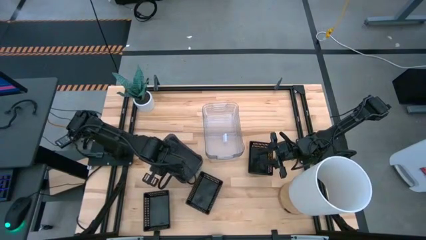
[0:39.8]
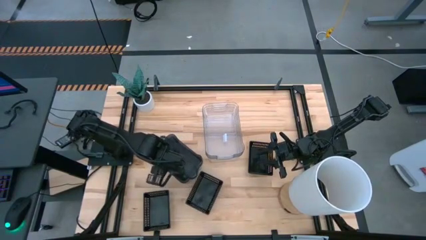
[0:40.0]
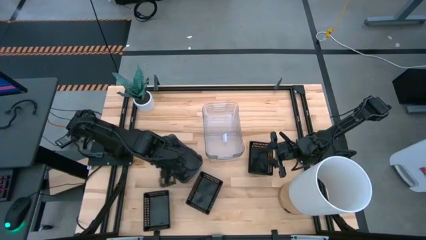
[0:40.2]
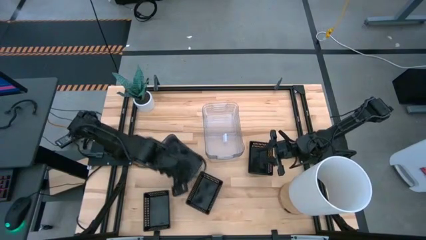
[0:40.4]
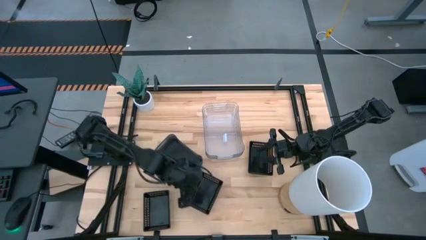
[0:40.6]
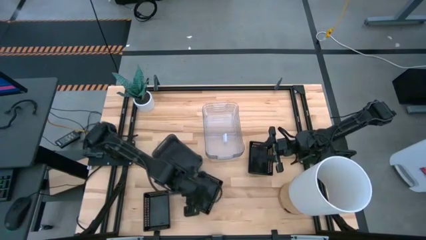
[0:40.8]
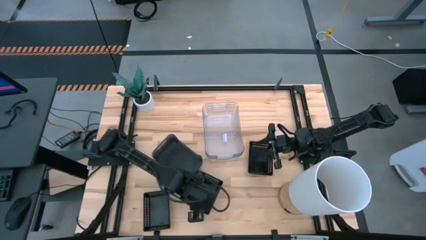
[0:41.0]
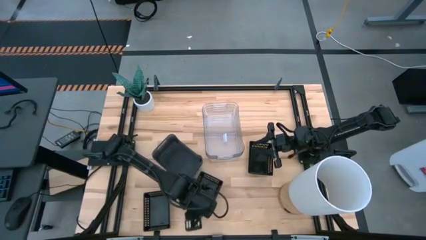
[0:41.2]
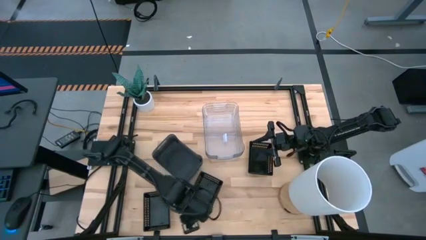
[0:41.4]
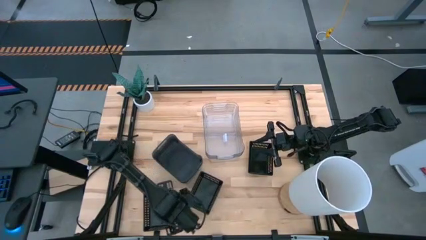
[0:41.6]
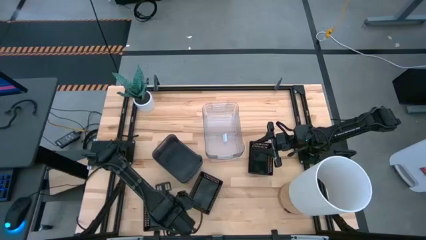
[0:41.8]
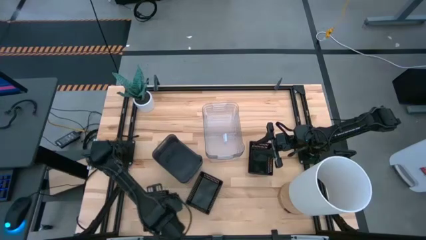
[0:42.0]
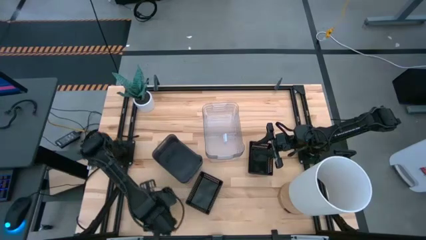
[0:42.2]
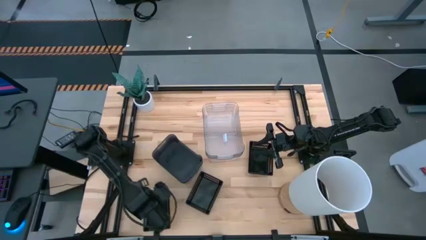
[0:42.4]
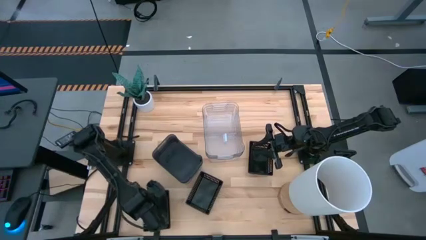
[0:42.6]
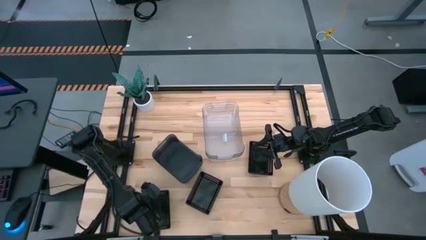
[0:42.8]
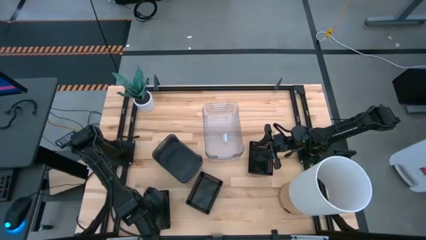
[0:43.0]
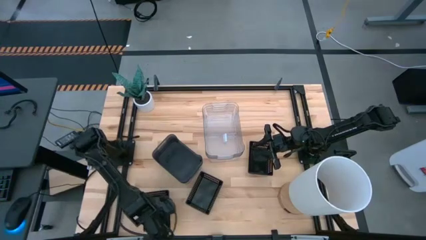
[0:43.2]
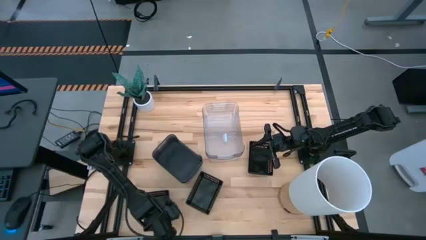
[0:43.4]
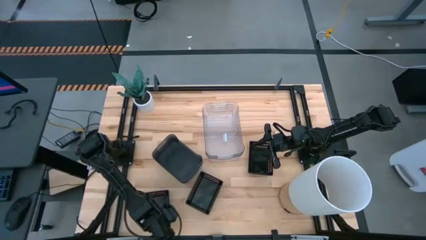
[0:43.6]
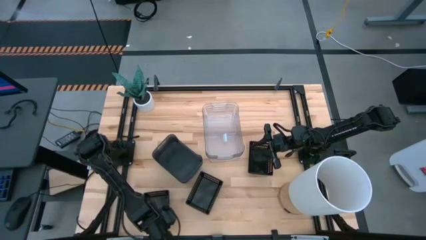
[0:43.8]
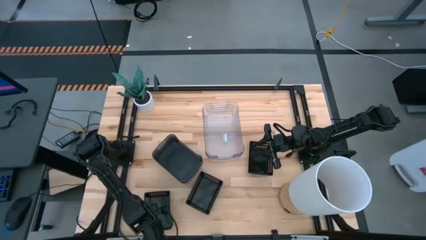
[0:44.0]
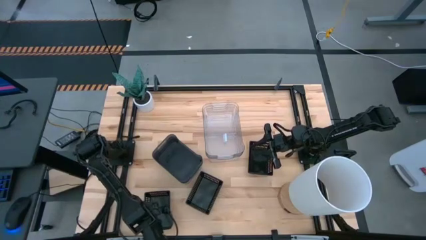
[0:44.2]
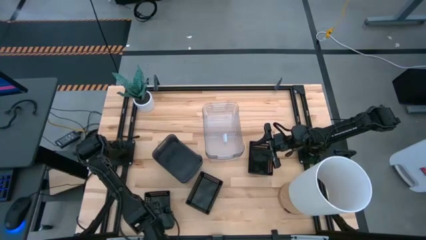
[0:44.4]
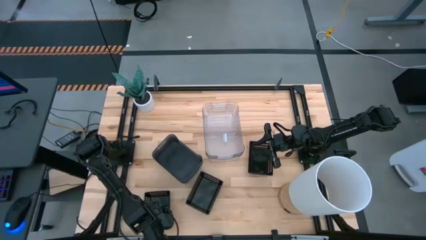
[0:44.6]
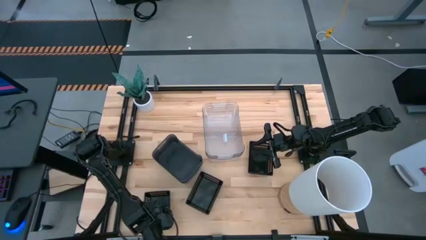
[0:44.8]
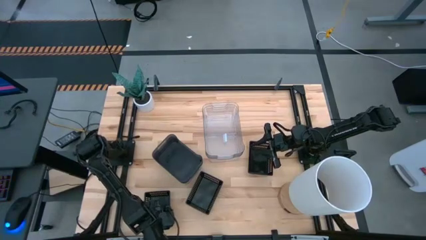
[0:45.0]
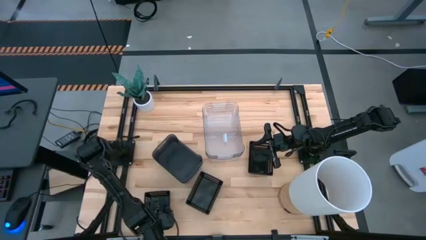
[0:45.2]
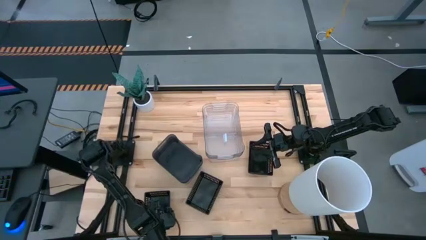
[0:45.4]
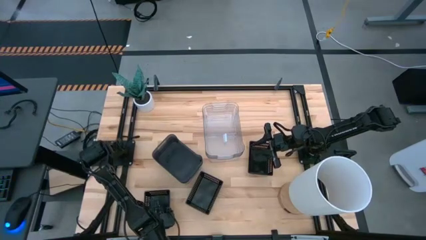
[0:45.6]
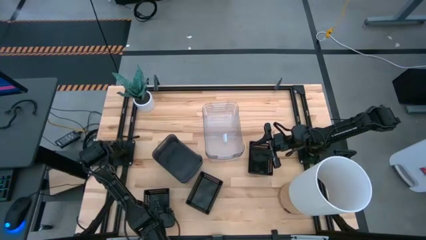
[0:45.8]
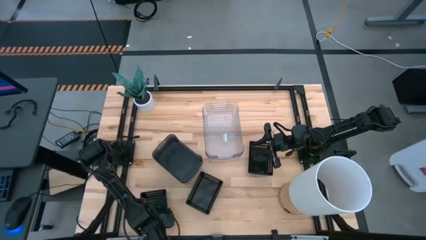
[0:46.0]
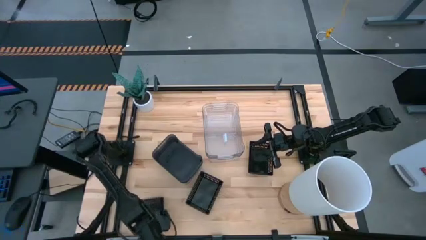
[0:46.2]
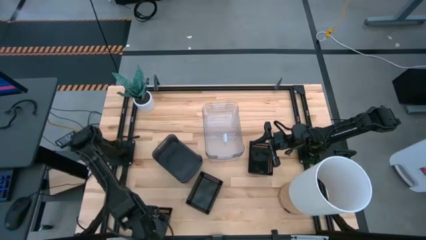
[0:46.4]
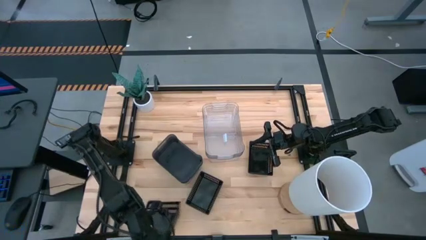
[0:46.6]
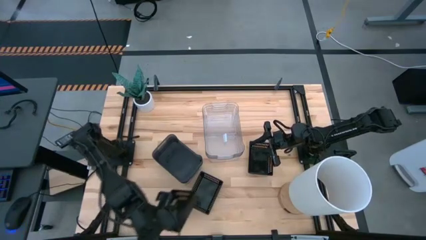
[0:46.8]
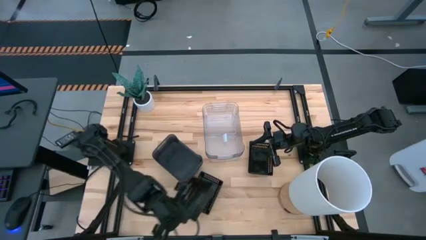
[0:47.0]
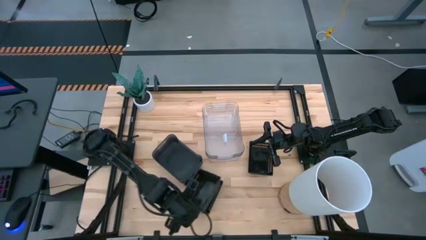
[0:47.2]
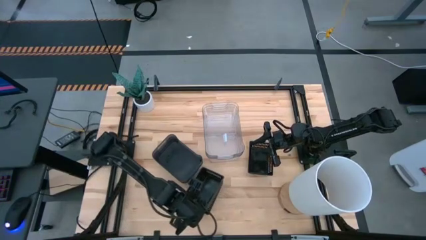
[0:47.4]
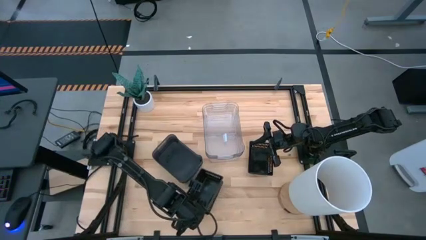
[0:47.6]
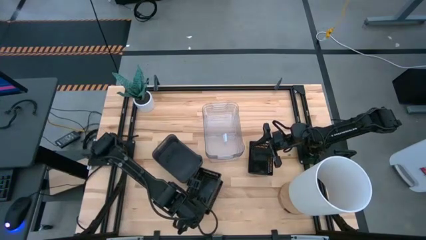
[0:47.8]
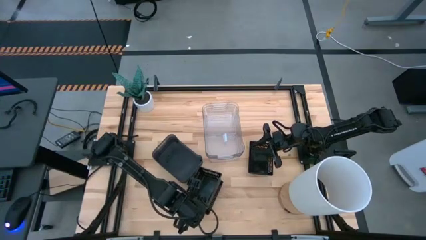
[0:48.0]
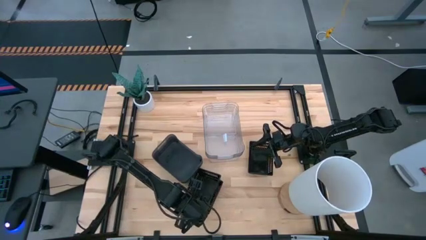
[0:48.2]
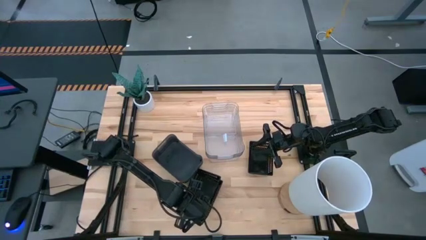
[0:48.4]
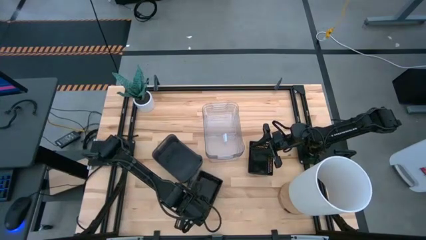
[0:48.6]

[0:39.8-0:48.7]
Stack the left black basket on the middle black basket

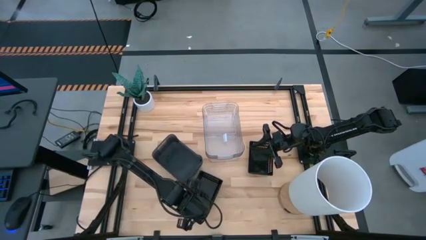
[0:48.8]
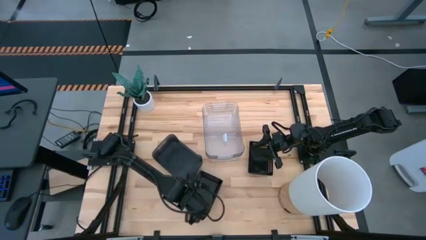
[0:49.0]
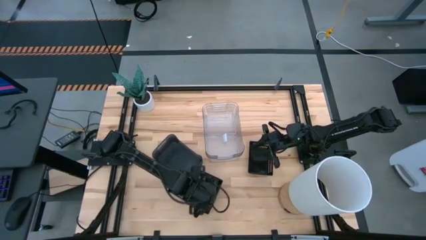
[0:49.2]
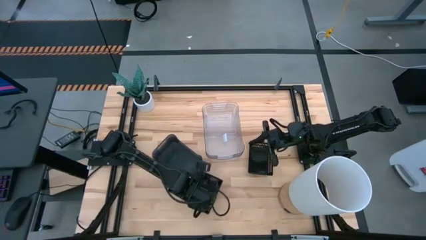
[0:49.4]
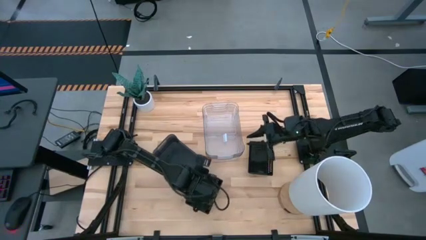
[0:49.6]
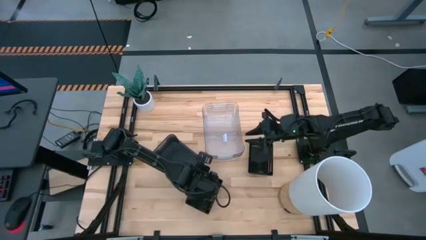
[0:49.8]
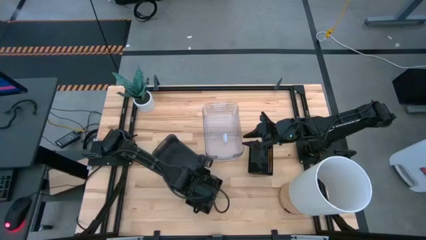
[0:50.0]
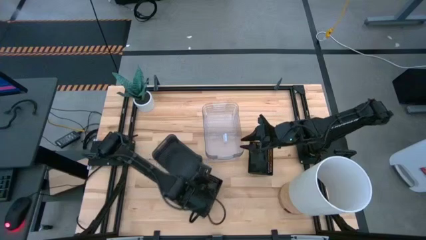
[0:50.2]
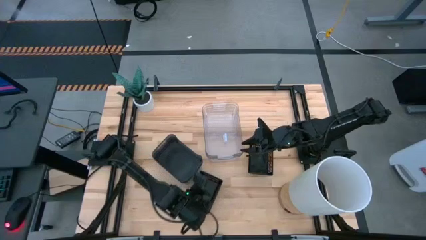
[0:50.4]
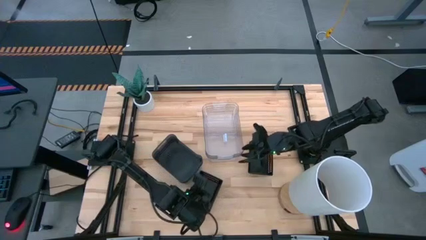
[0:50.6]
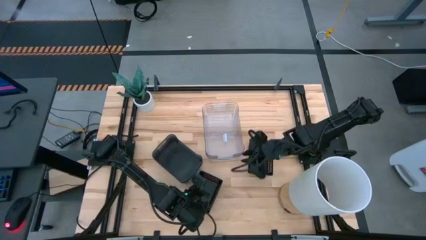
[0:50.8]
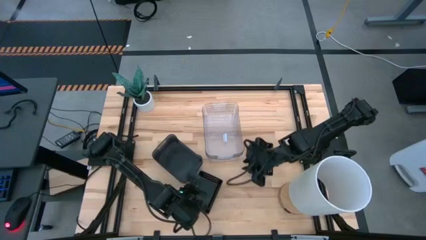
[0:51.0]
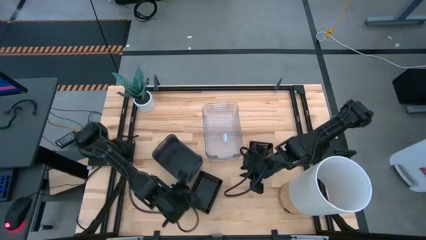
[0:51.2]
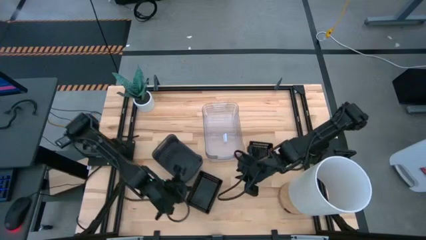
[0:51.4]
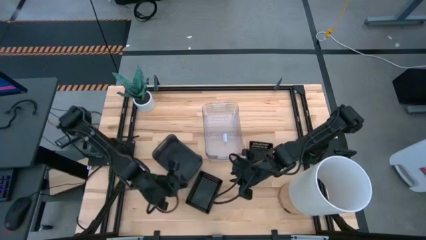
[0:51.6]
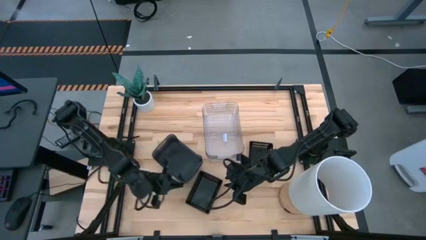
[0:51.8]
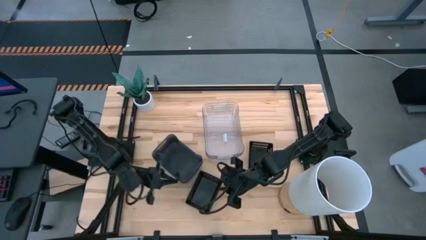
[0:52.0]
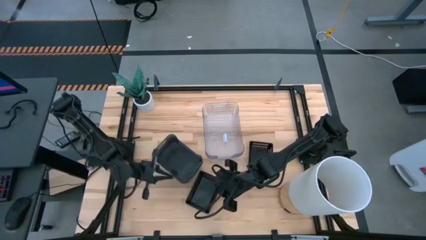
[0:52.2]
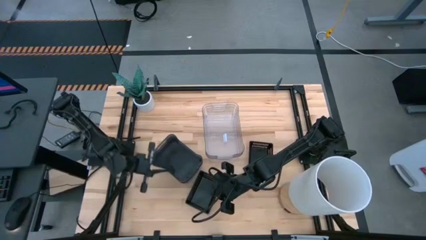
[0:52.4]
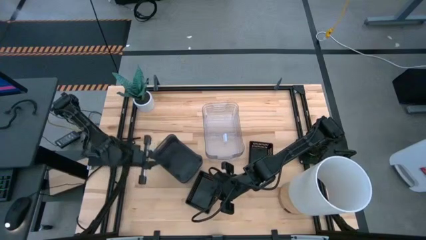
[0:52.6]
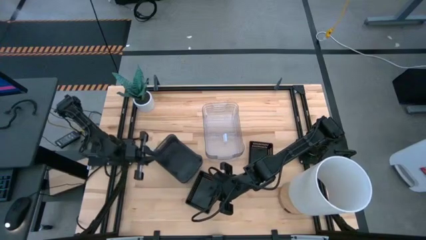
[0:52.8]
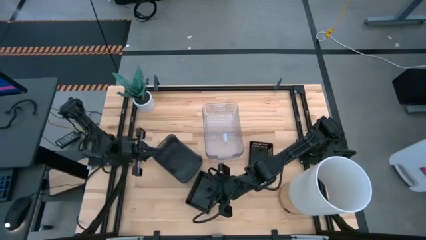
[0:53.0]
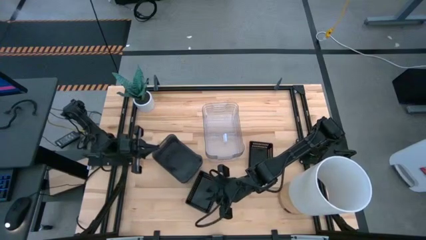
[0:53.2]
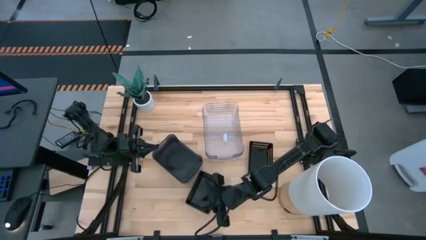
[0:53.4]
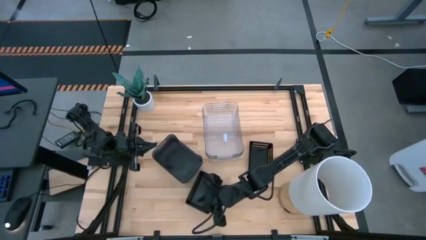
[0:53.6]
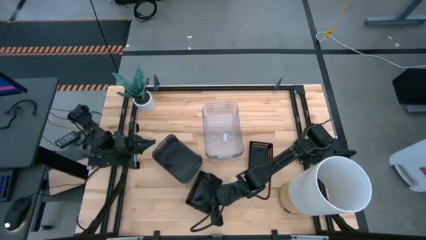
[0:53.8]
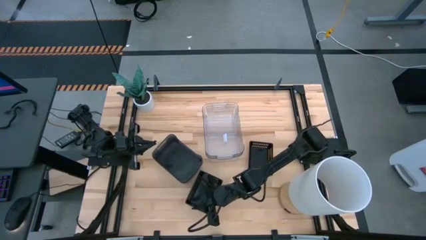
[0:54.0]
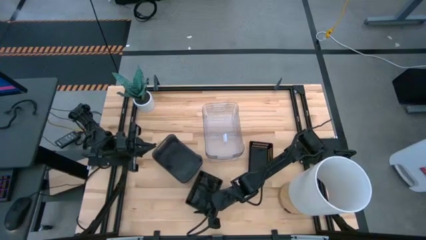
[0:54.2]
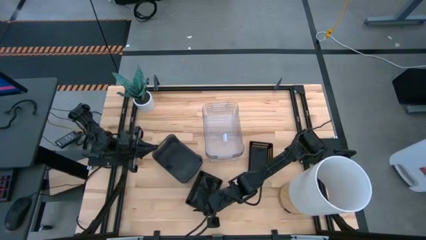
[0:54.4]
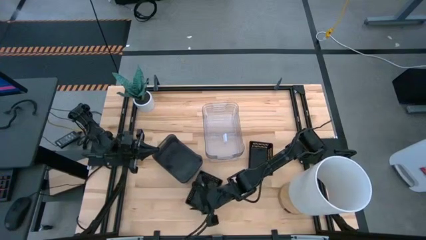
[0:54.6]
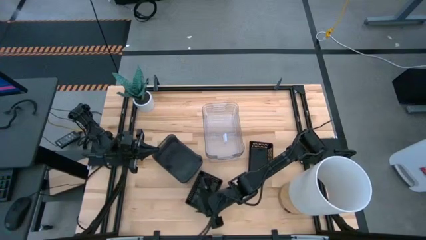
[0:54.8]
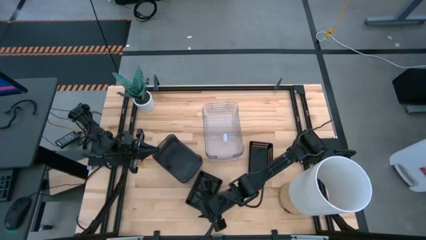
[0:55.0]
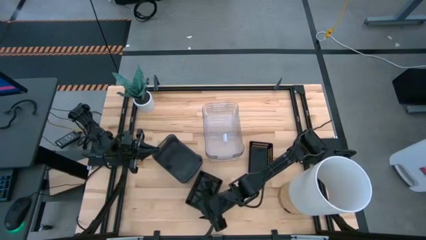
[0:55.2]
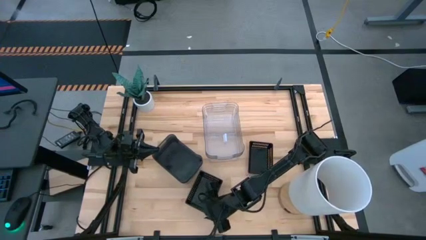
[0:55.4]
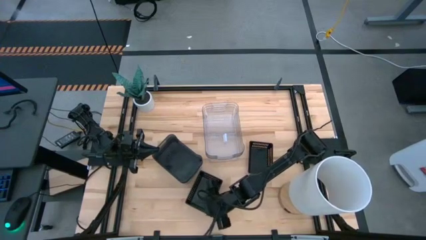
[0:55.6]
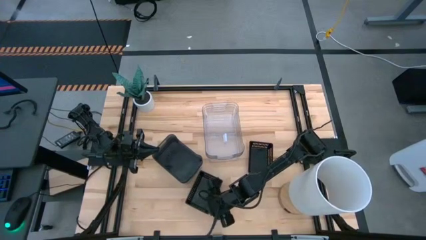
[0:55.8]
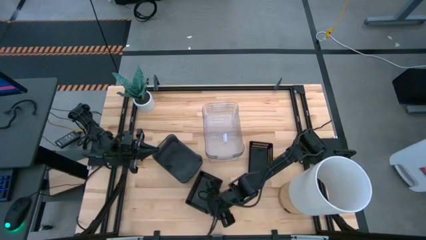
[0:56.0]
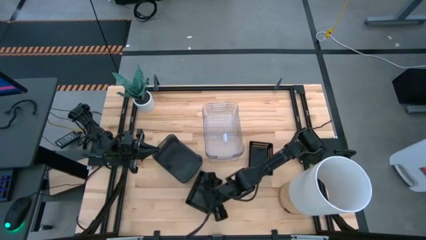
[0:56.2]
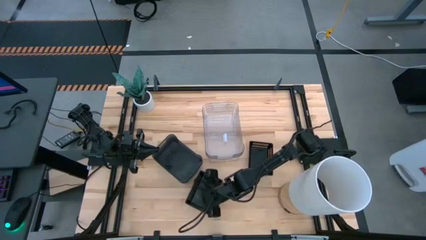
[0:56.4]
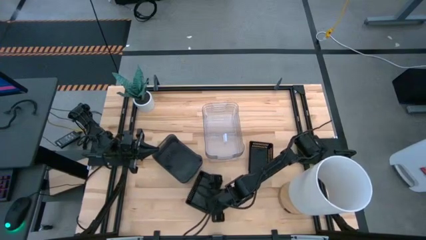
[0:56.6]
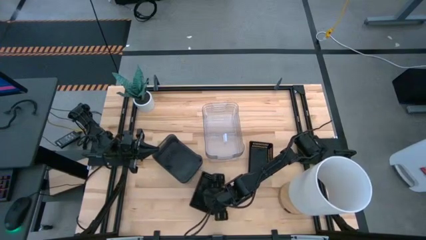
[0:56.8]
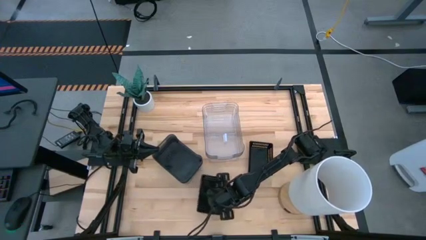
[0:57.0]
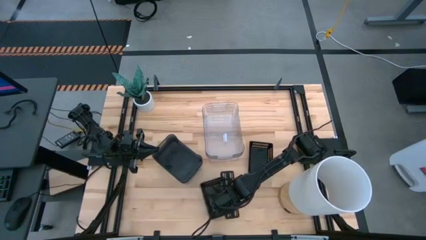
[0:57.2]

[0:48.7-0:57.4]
Adjust the stacked black basket
